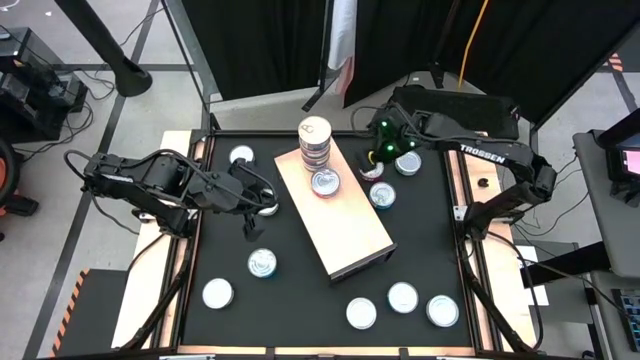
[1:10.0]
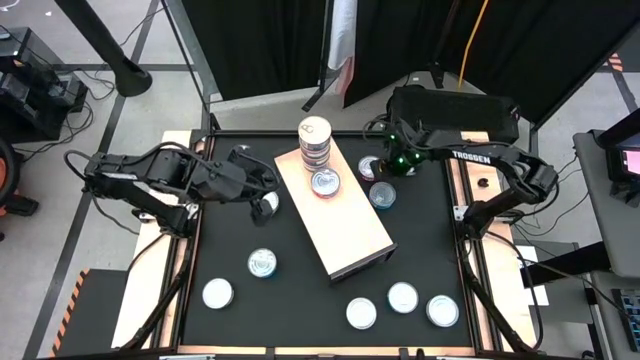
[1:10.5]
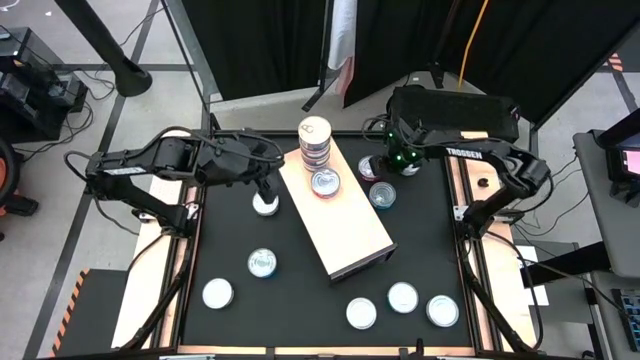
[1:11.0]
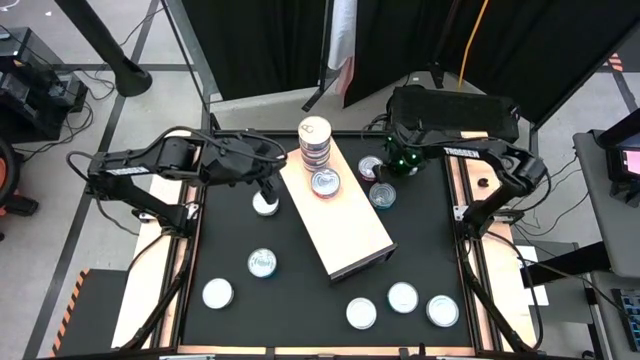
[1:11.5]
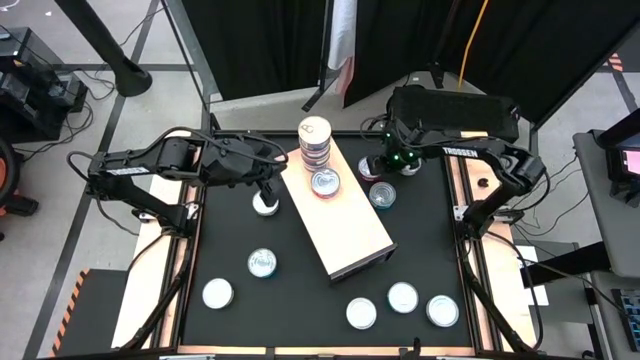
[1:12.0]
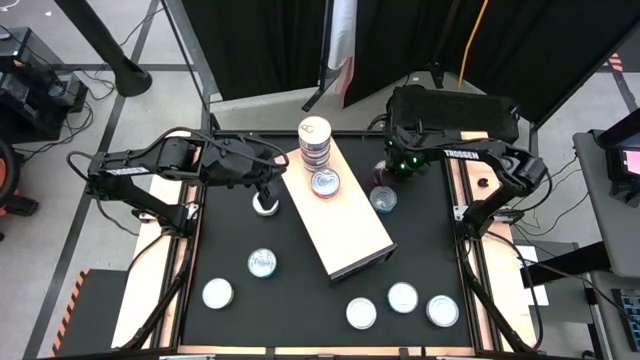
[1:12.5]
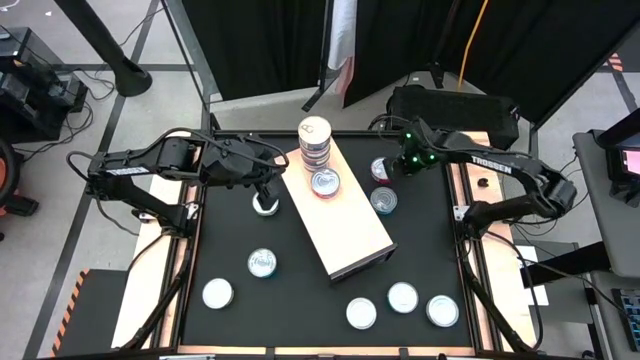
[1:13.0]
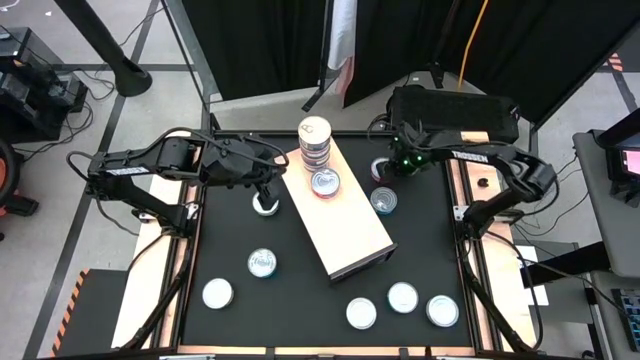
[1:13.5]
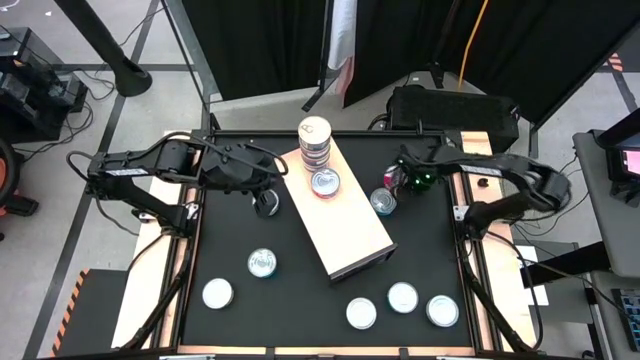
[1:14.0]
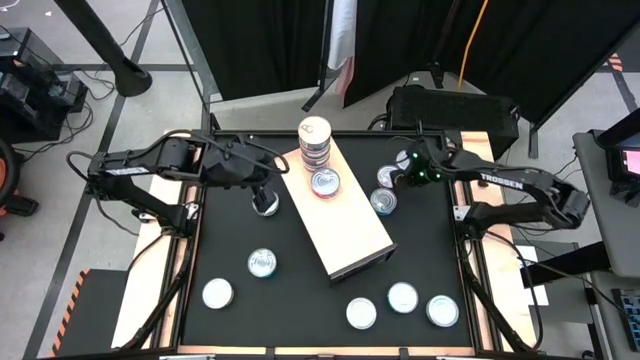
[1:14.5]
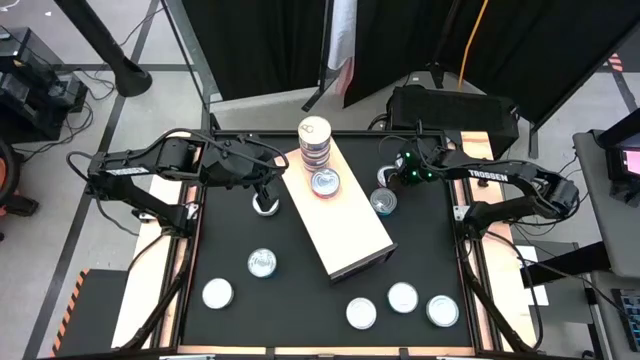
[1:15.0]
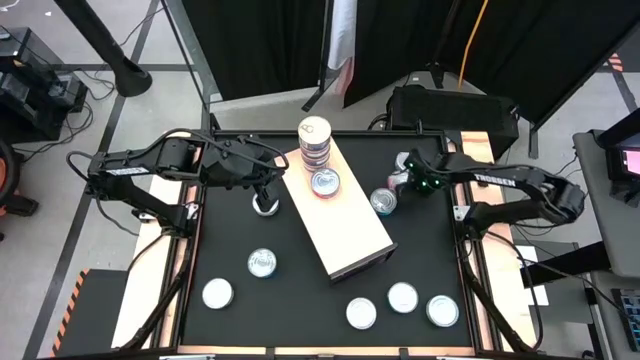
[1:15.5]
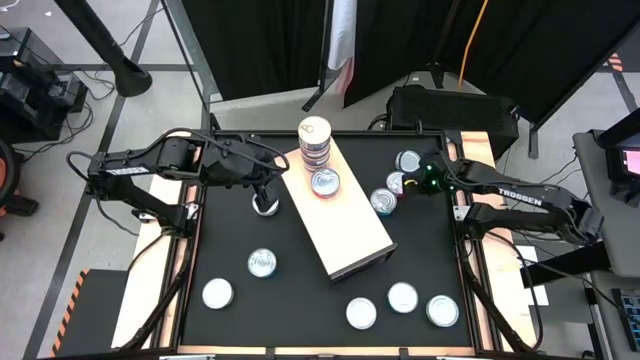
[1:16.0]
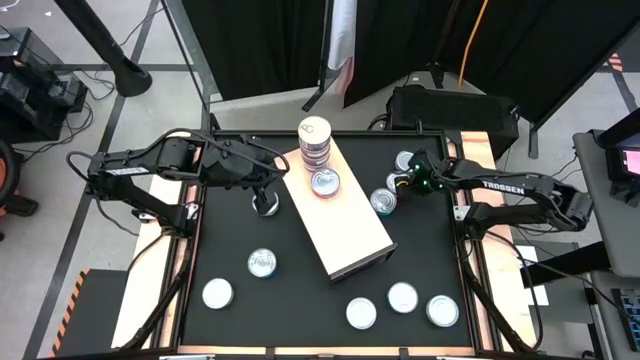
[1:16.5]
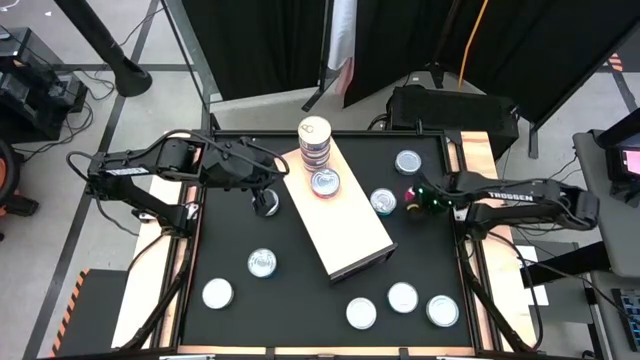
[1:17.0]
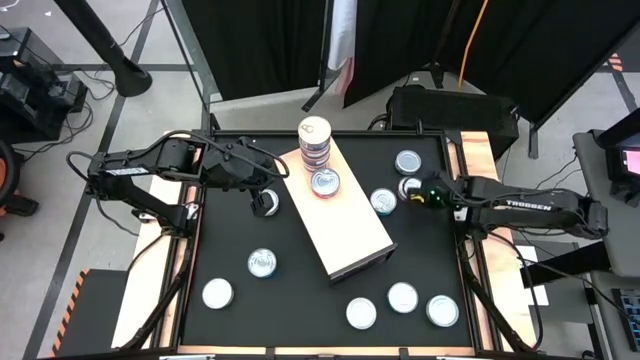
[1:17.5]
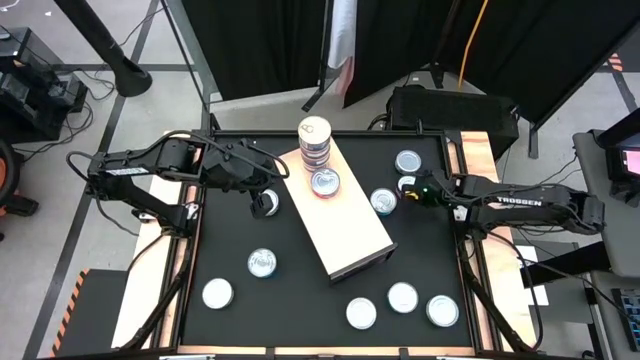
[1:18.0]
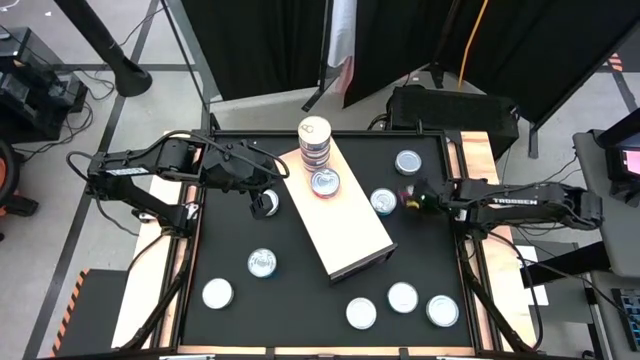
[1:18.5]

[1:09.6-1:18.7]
Task: Stack canned seafood by type on shelf
Stack the red tuna can on top of the red tuna can on the shelf

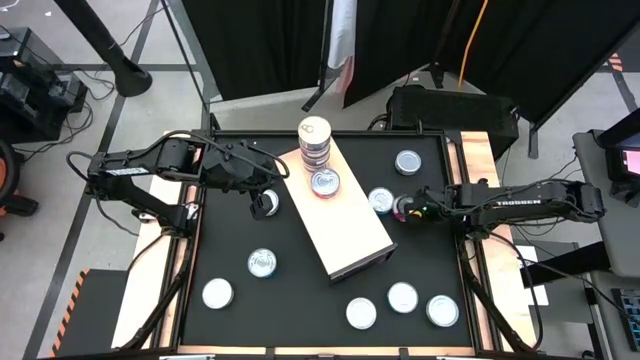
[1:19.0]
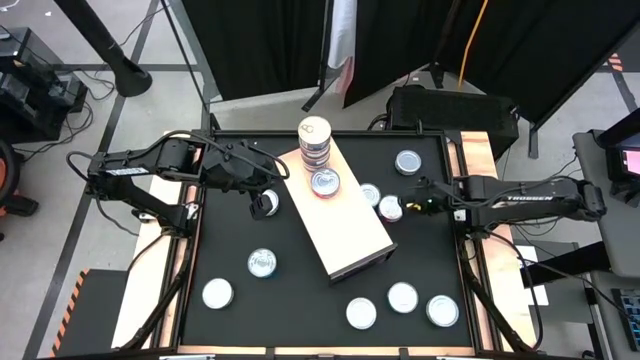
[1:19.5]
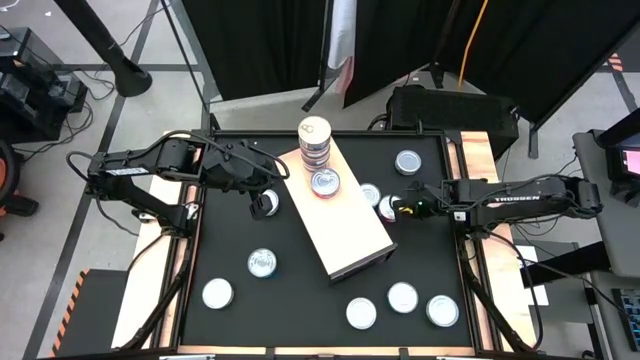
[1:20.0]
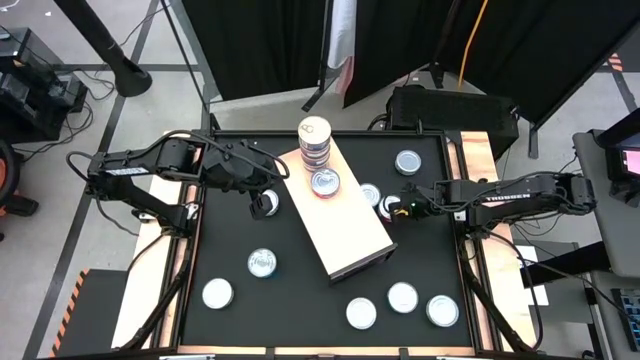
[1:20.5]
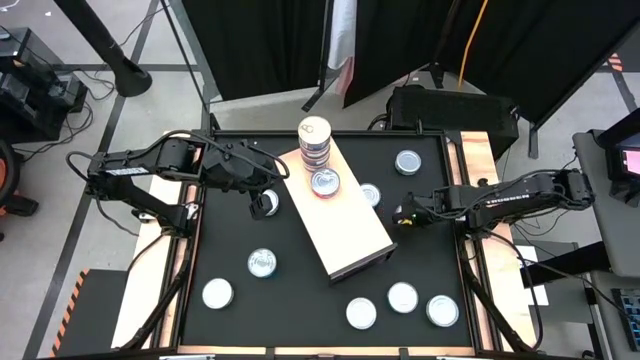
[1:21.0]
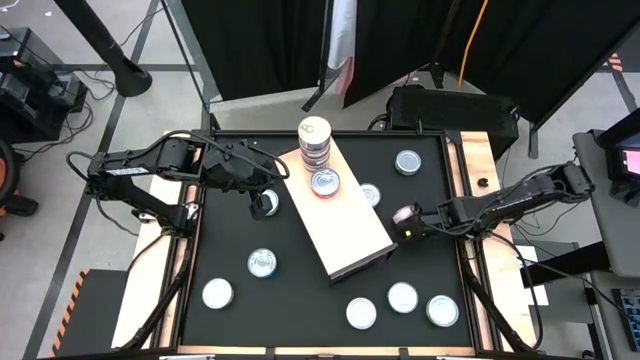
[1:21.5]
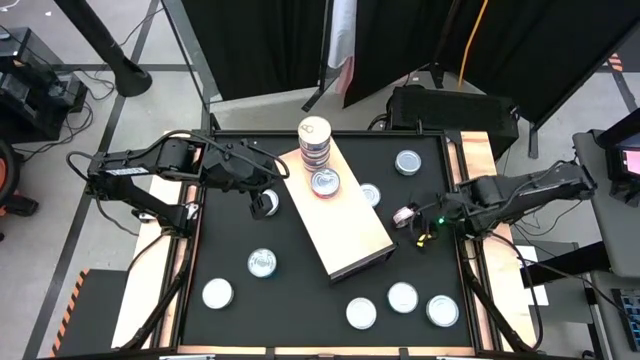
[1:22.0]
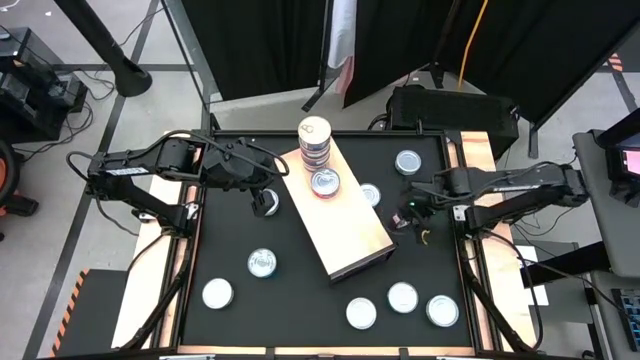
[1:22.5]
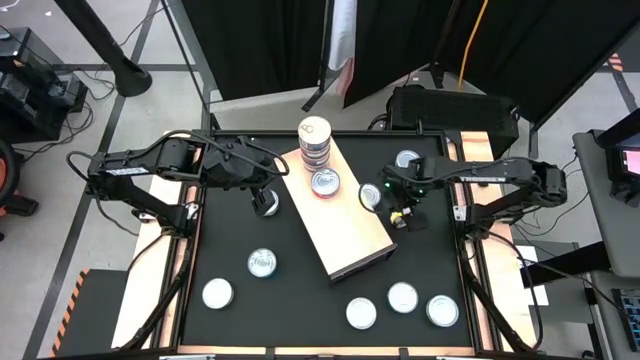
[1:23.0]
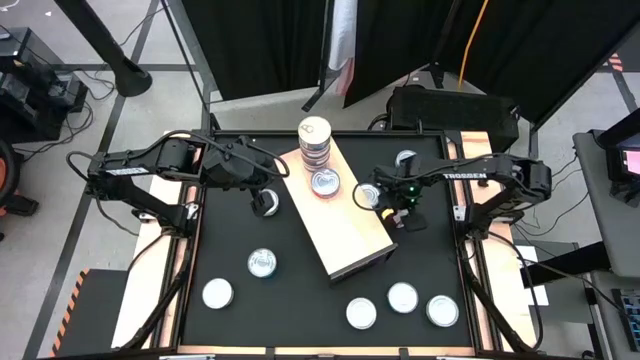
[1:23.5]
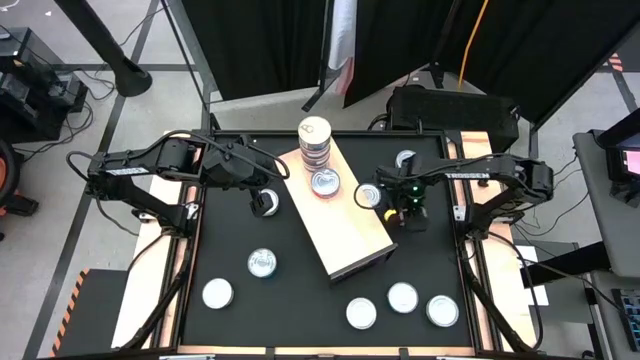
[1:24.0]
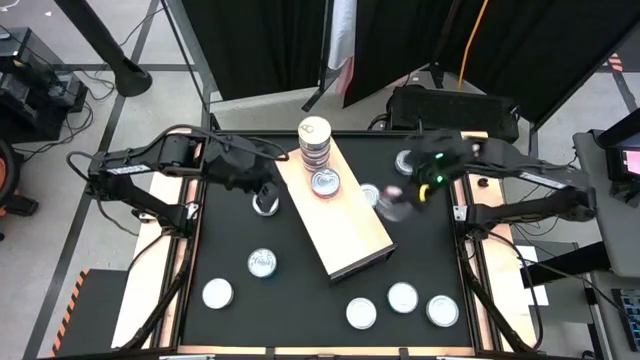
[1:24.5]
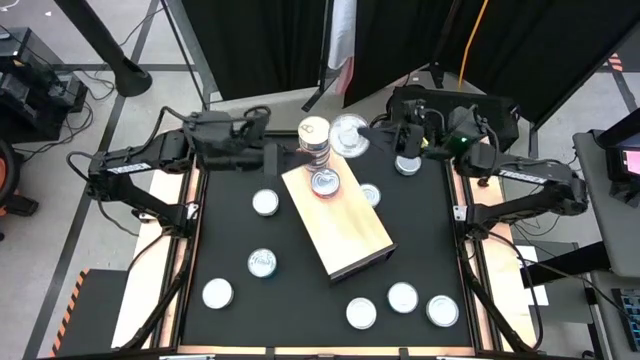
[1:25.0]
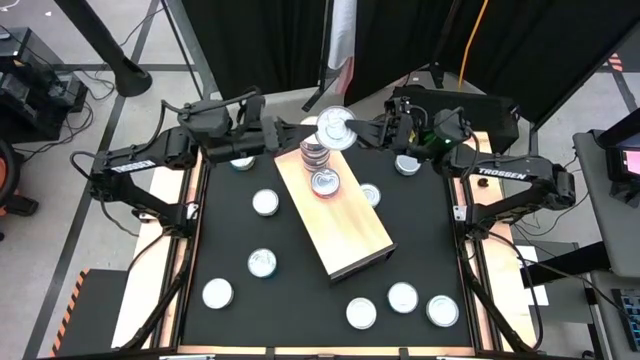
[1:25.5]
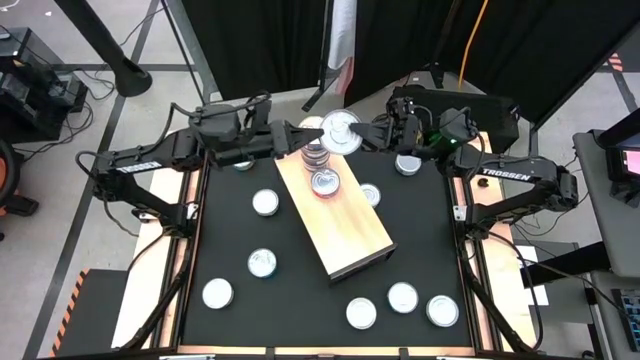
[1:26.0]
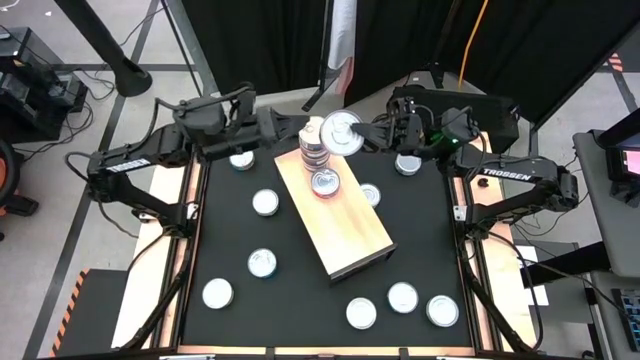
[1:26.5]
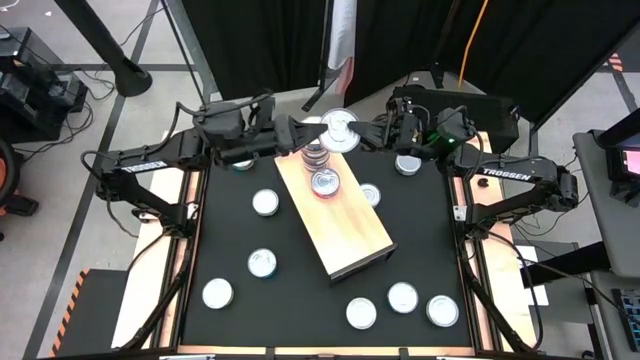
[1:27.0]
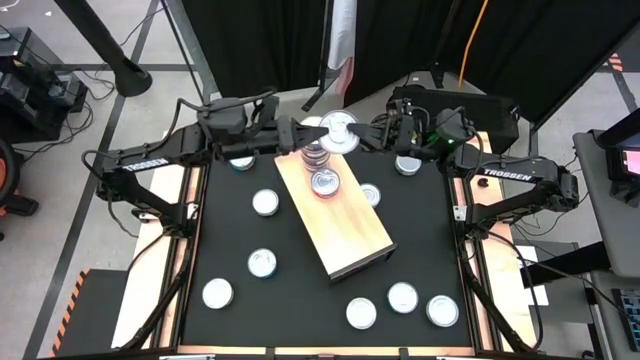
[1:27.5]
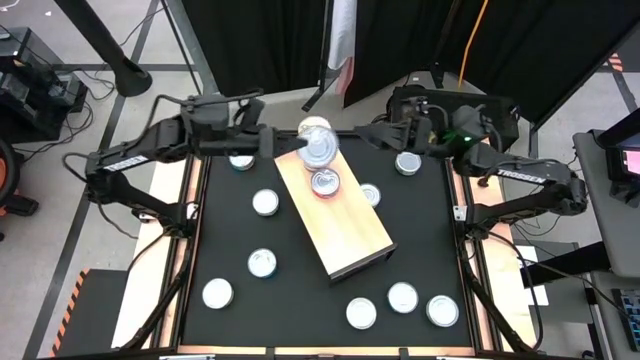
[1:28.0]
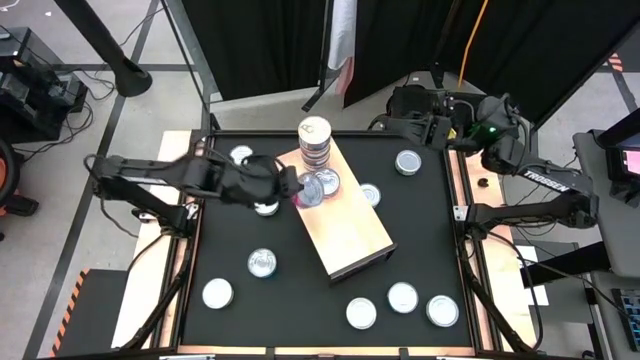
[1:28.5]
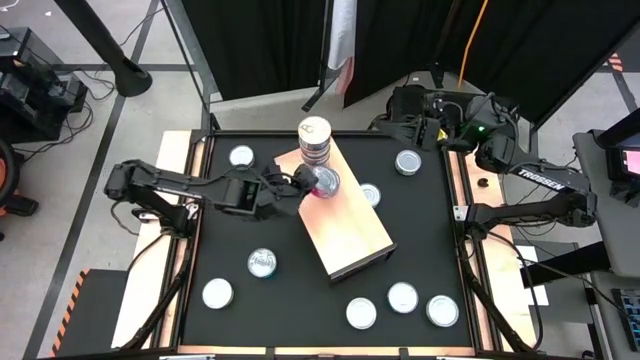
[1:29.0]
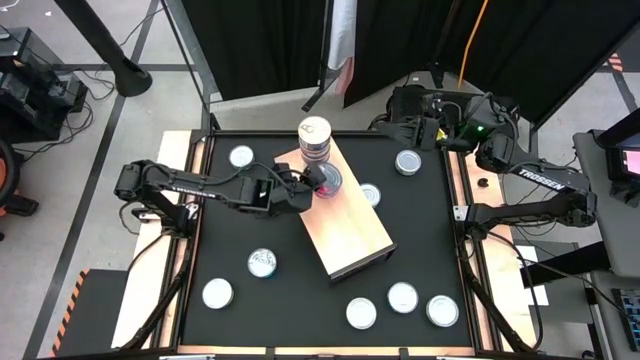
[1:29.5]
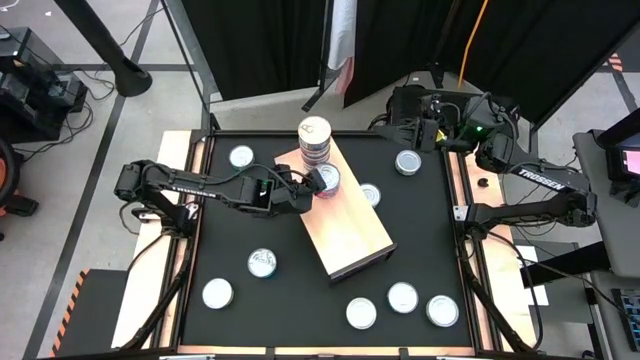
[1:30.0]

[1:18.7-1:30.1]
Stack the red tuna can on top of the stacked red tuna can on the shelf

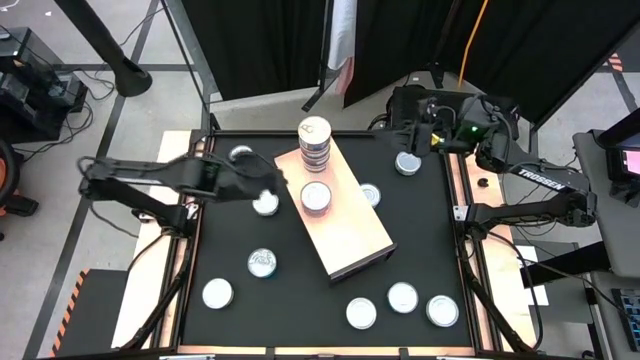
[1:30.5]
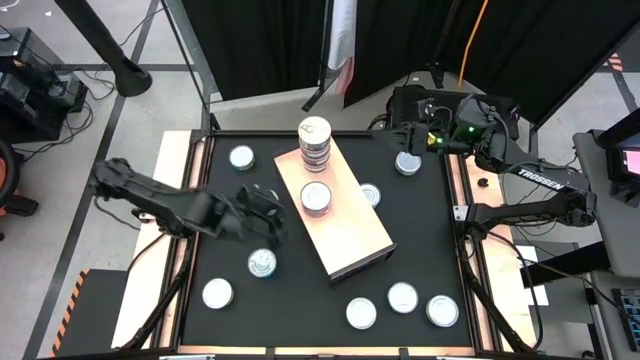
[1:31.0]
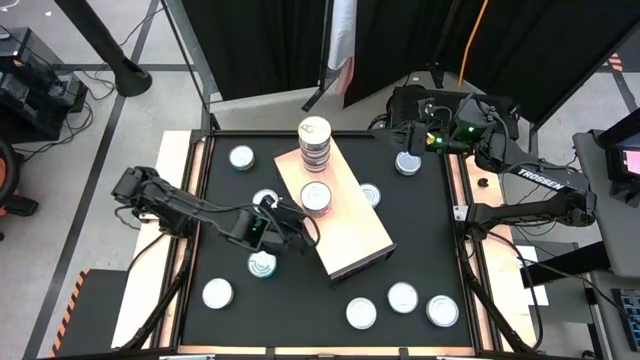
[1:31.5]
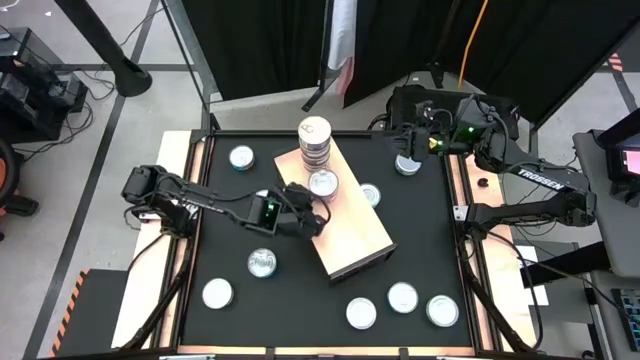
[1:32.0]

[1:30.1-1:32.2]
Adjust the stacked red tuna cans
